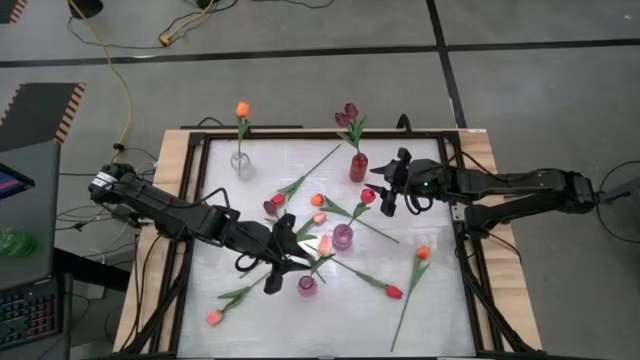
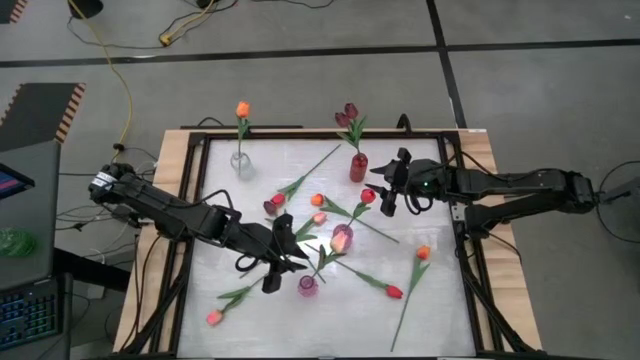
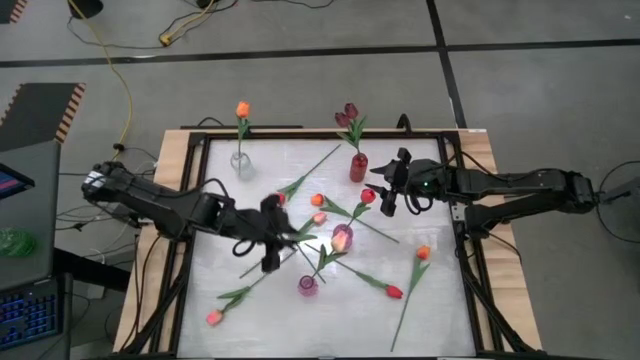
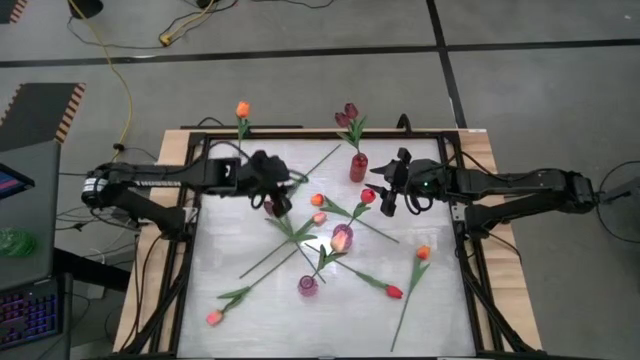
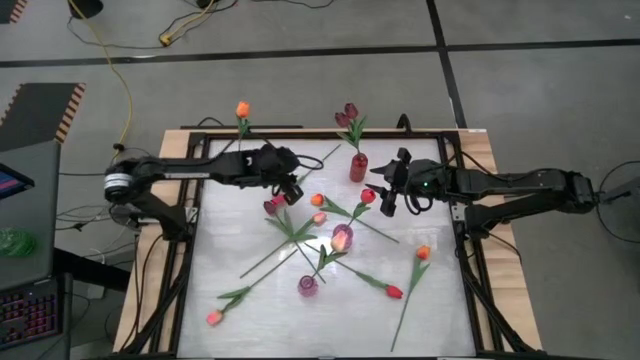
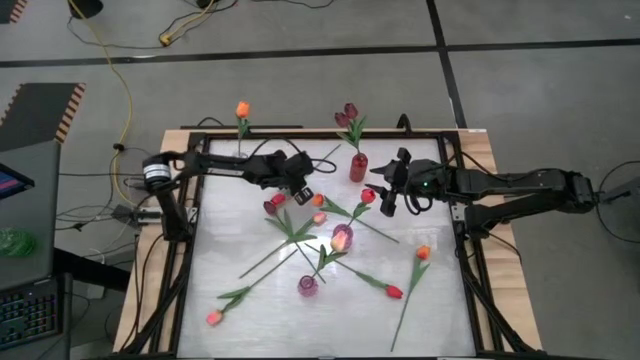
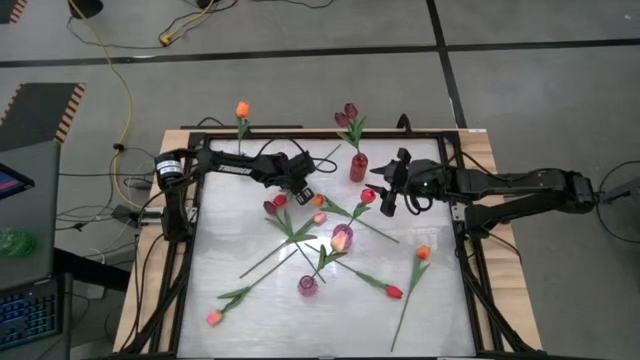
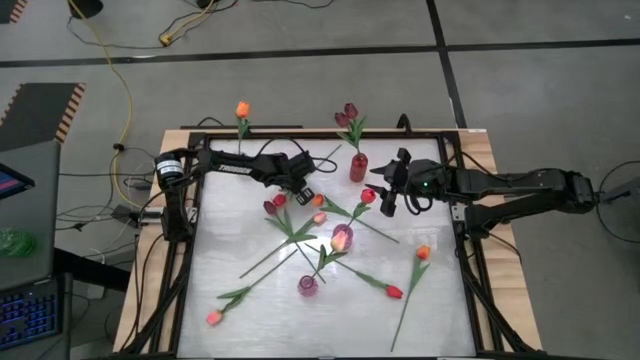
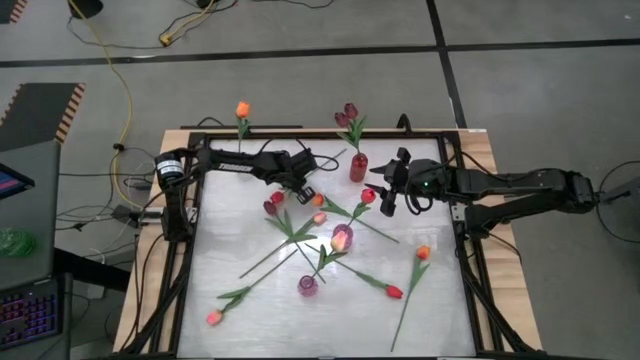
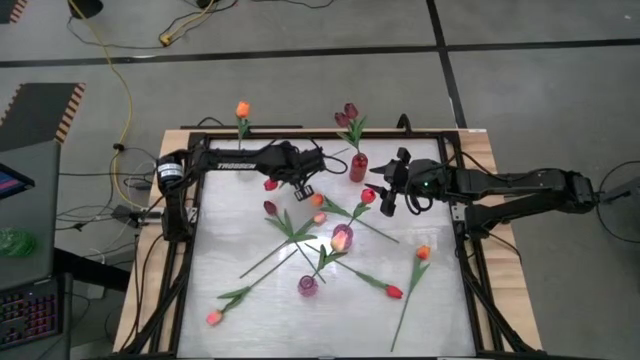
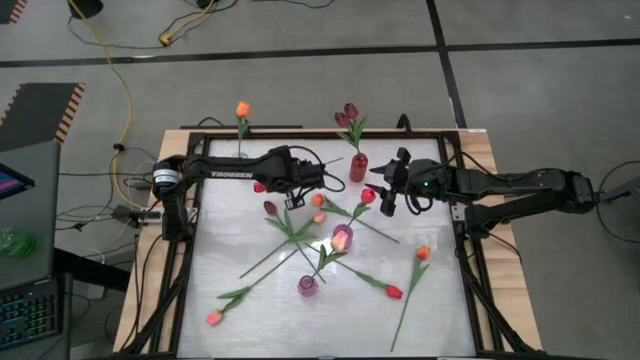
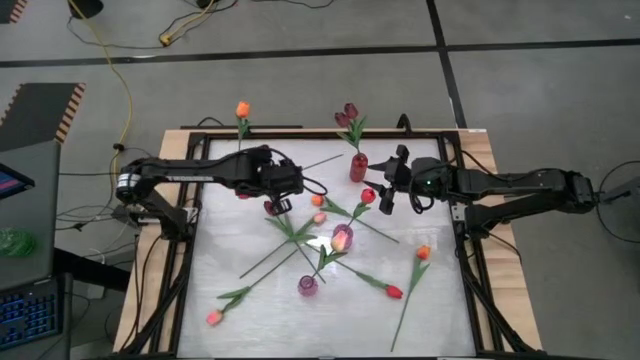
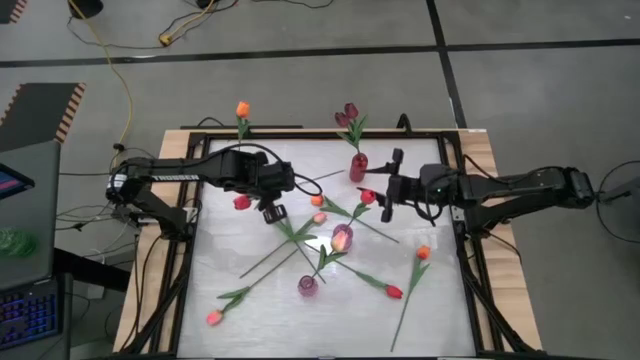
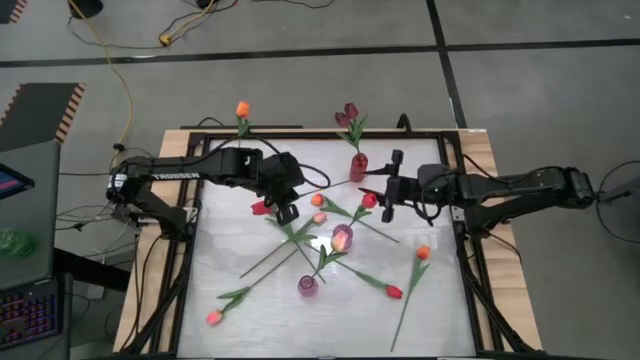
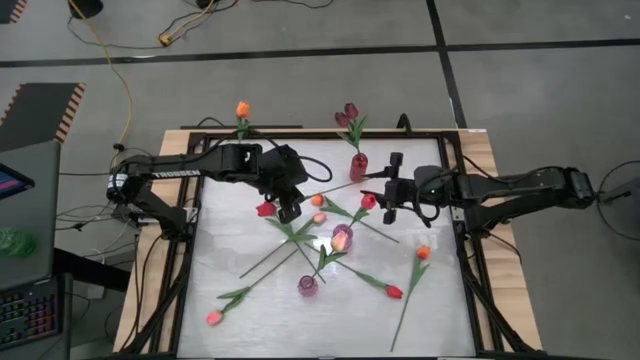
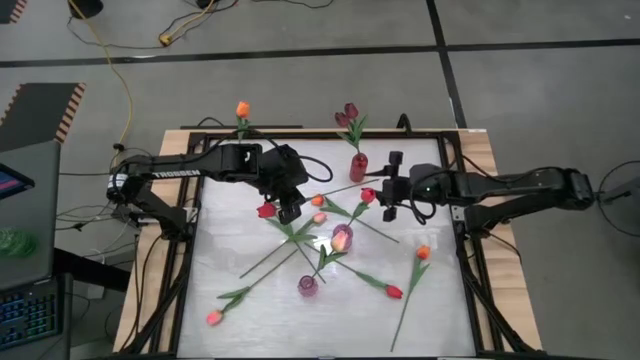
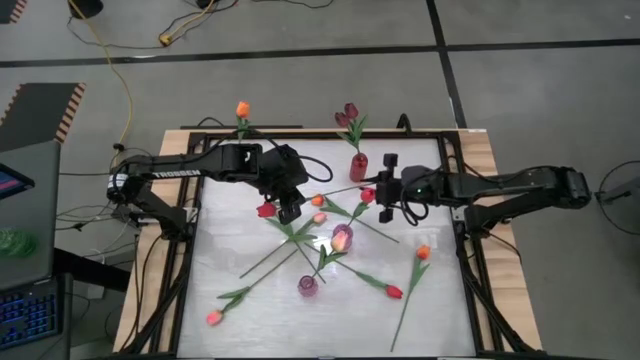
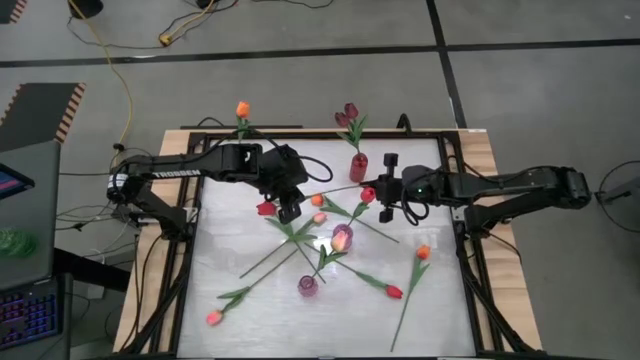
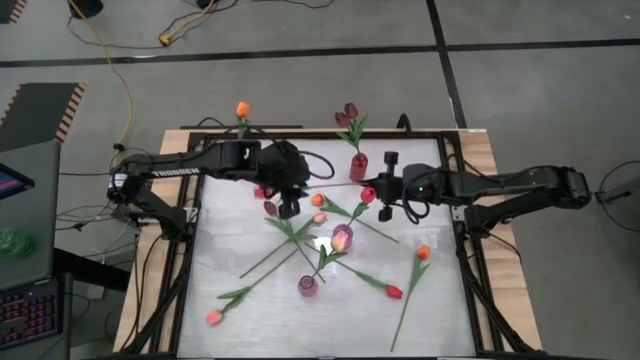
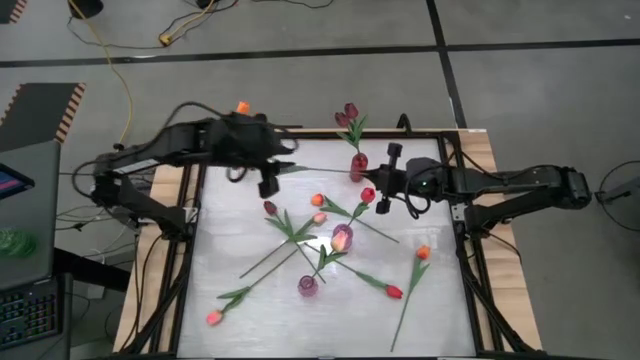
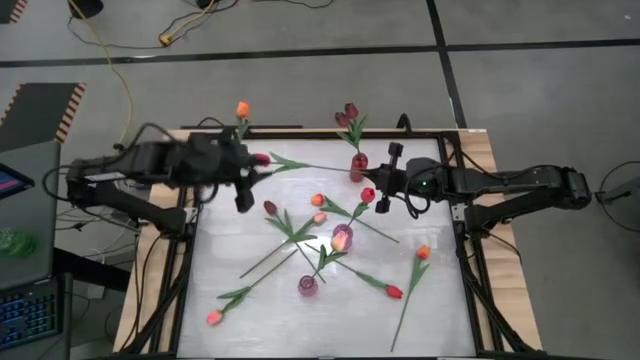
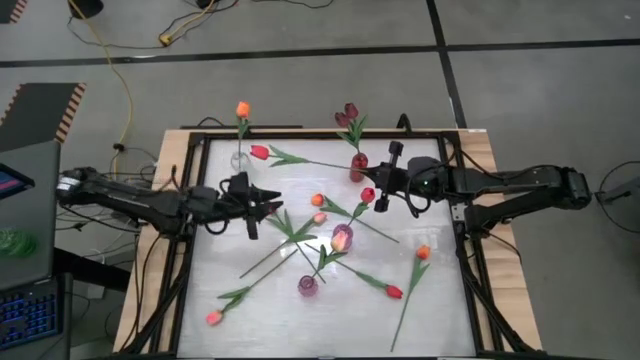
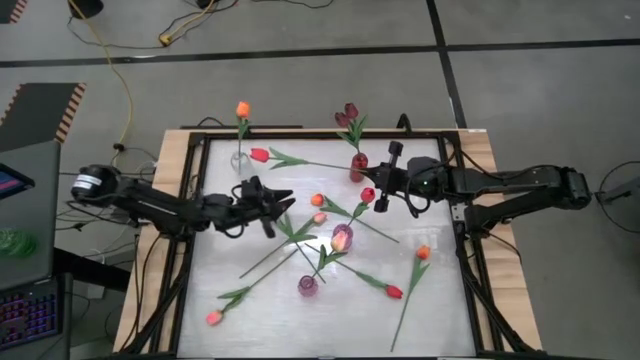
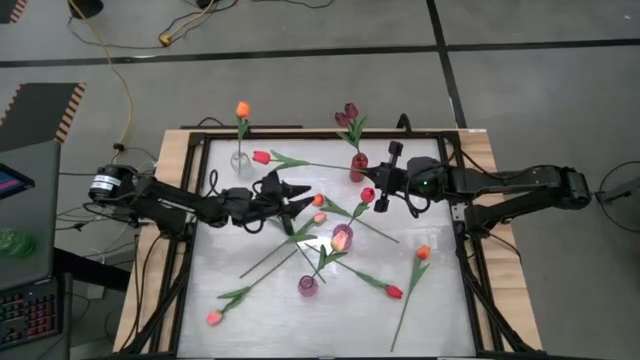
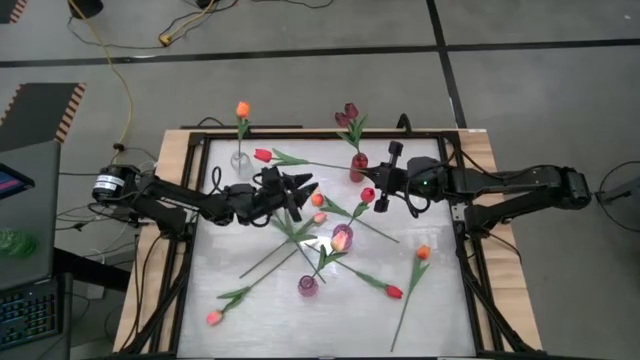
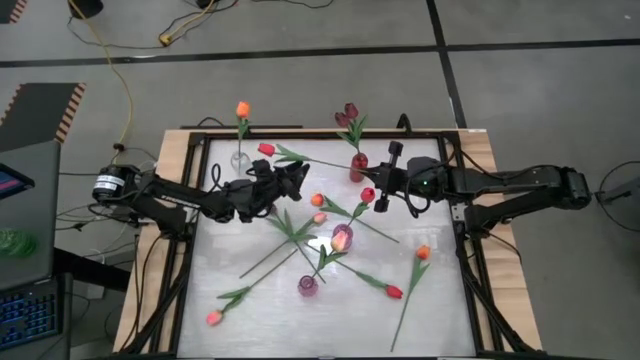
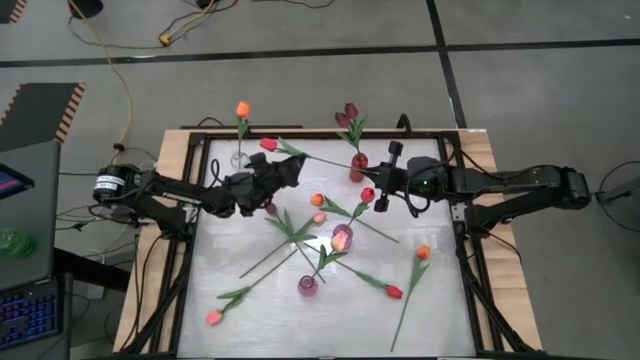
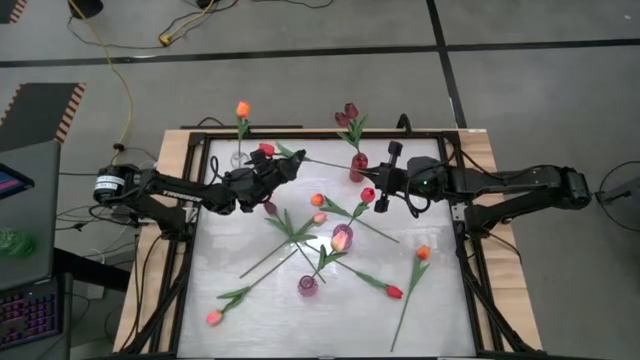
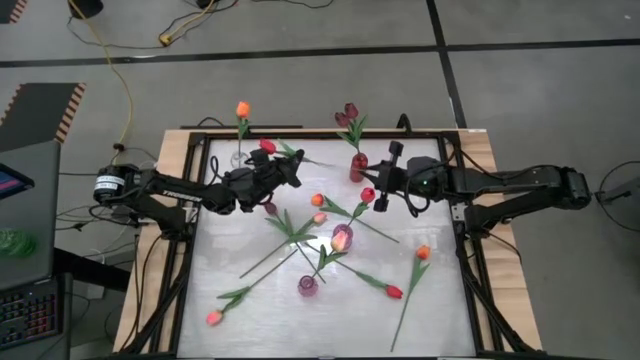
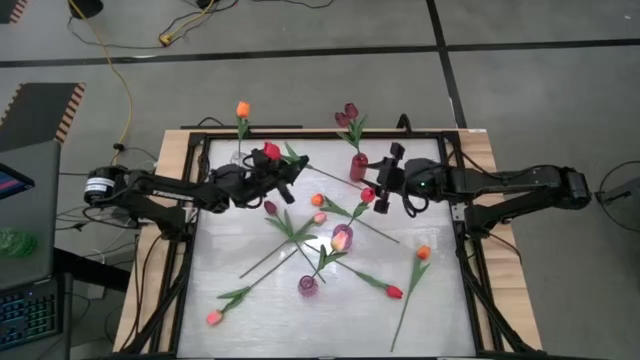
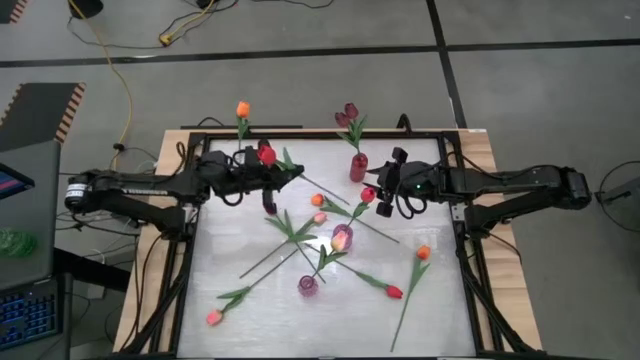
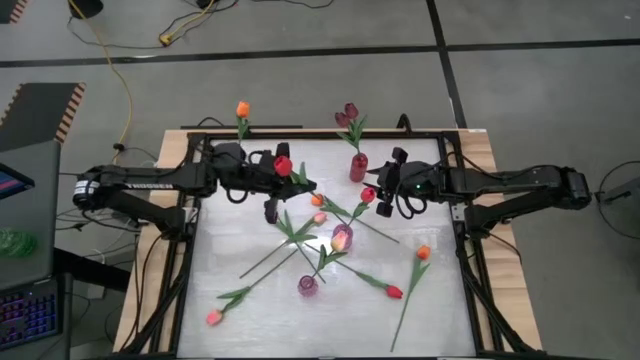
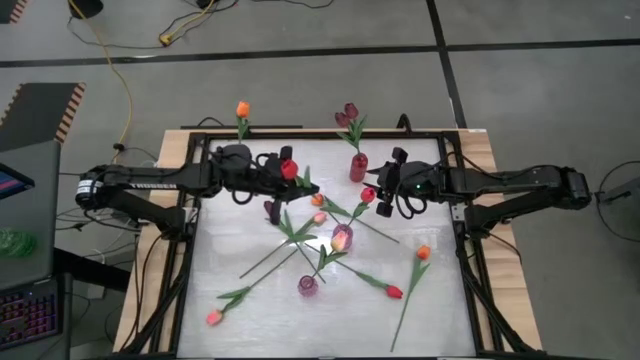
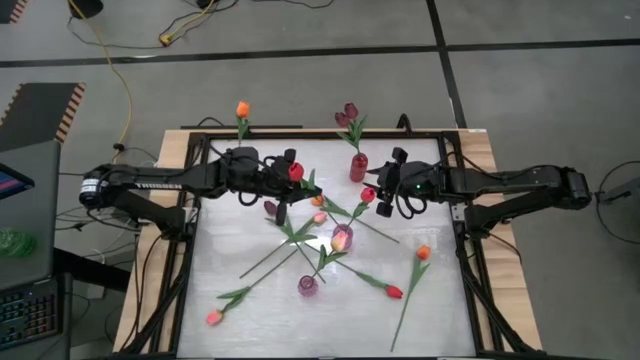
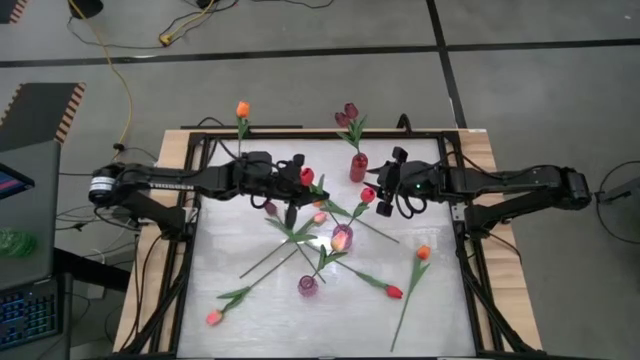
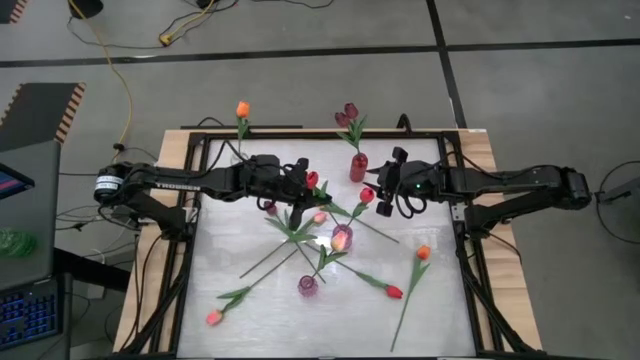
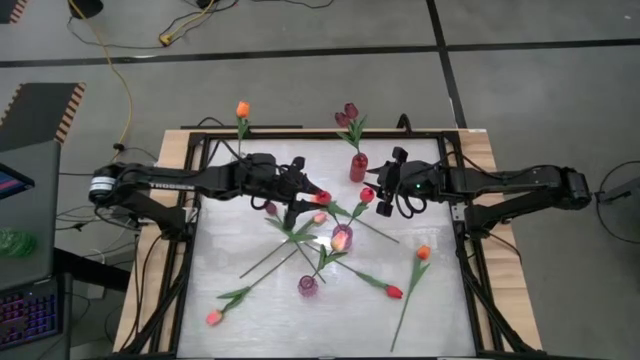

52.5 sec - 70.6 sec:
Task: Sort flowers into vase by color
Put the top red flower into the top purple vase

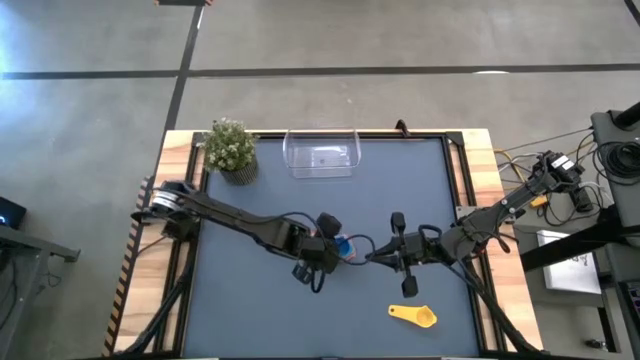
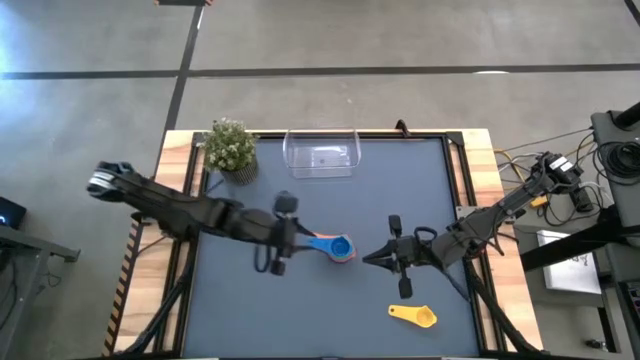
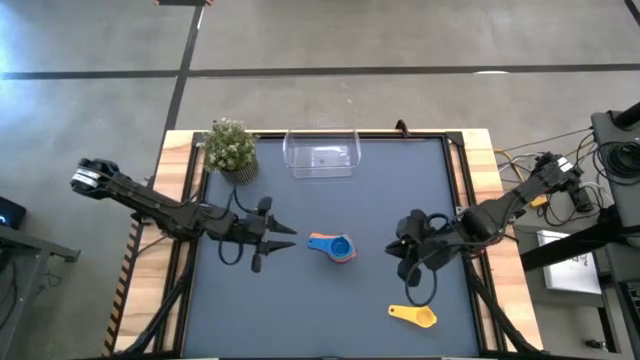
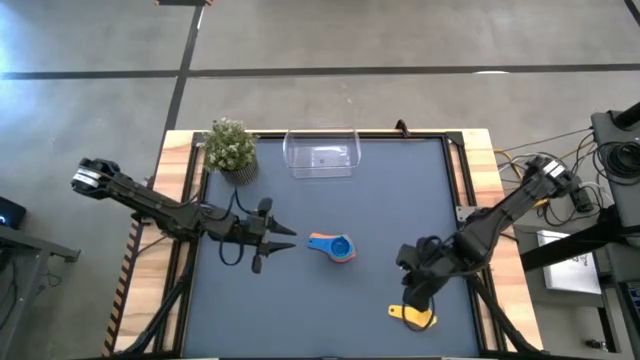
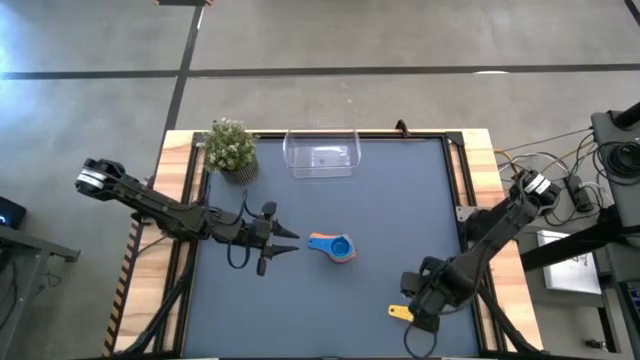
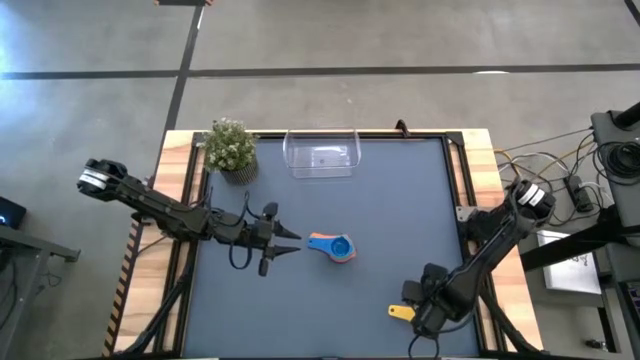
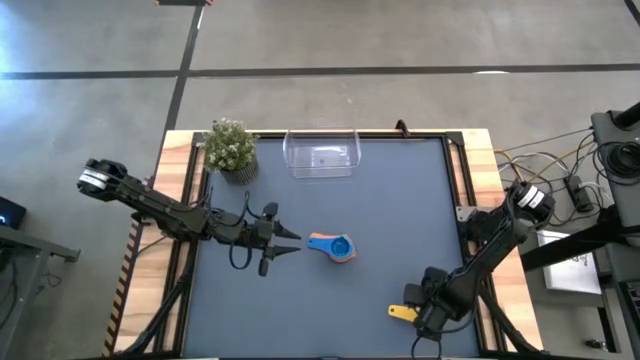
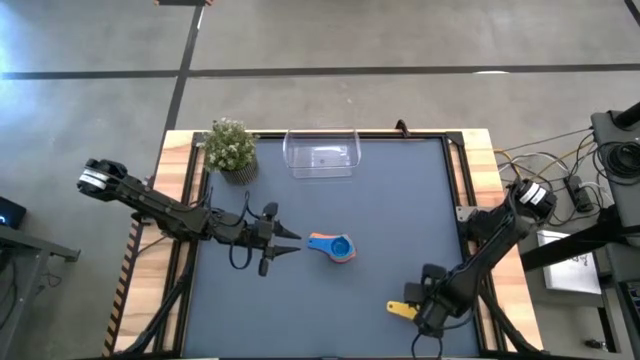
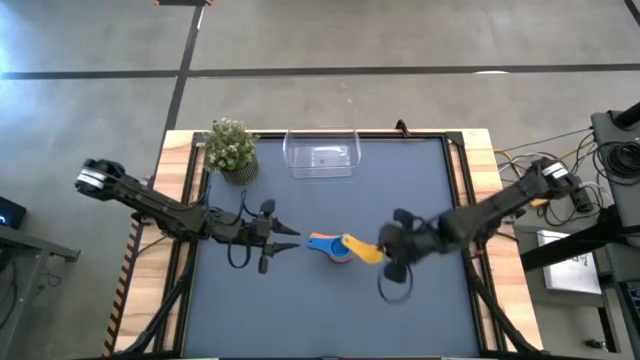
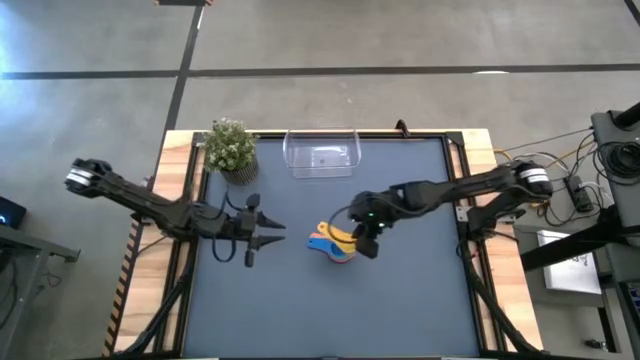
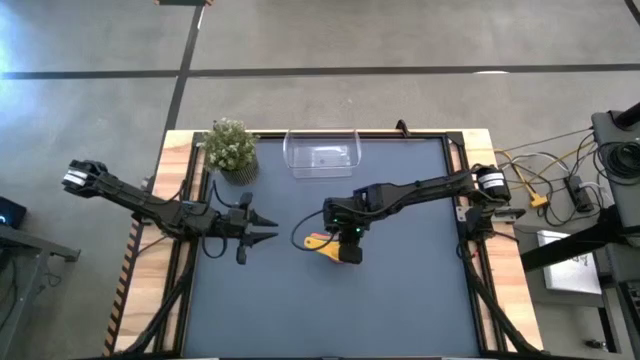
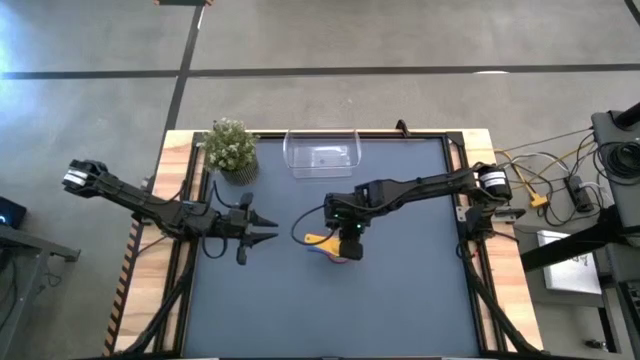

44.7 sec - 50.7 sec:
Task: Nest measuring cups in basket
Stack the yellow measuring cup on top of the blue measuring cup
